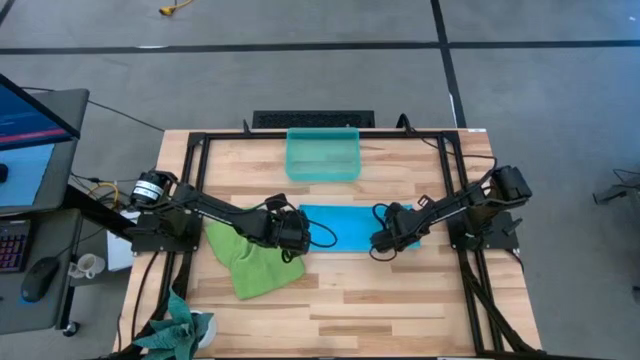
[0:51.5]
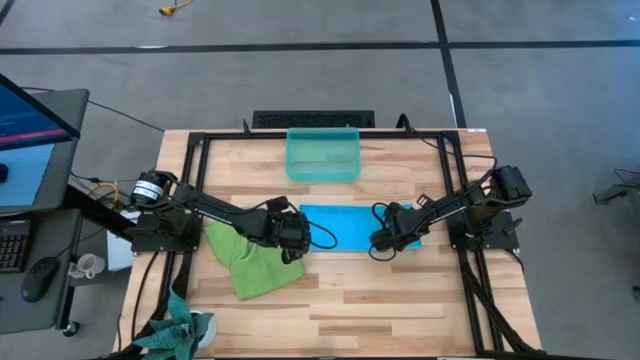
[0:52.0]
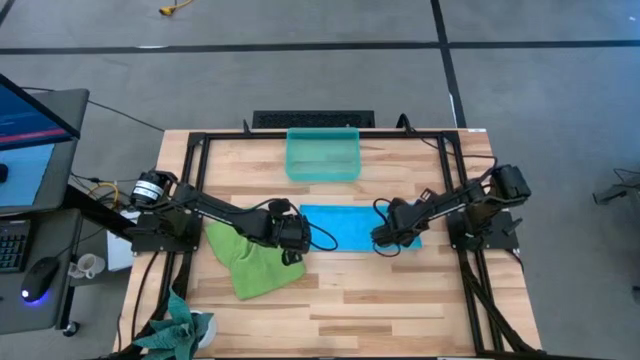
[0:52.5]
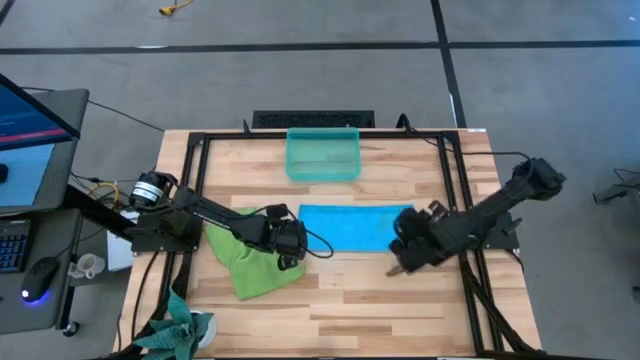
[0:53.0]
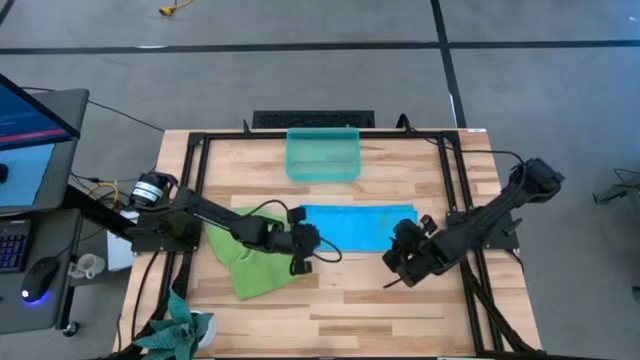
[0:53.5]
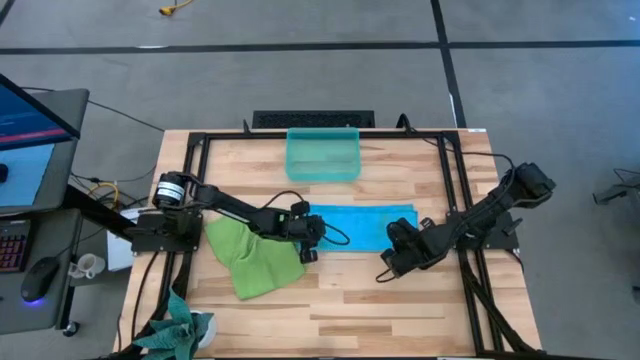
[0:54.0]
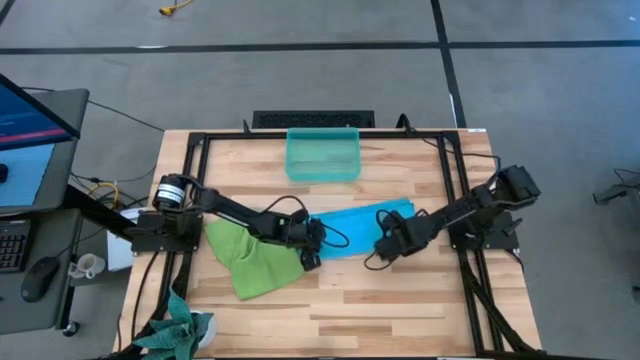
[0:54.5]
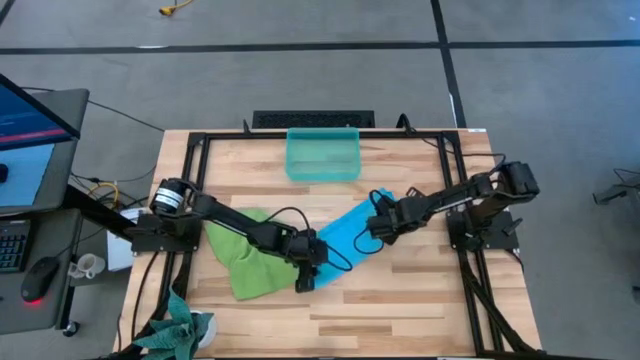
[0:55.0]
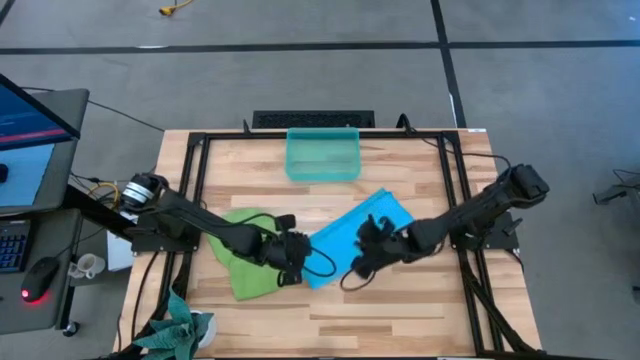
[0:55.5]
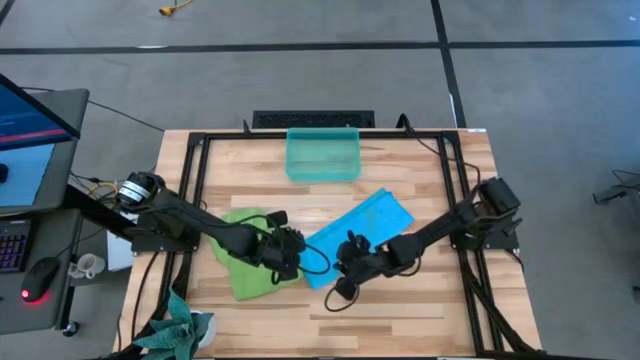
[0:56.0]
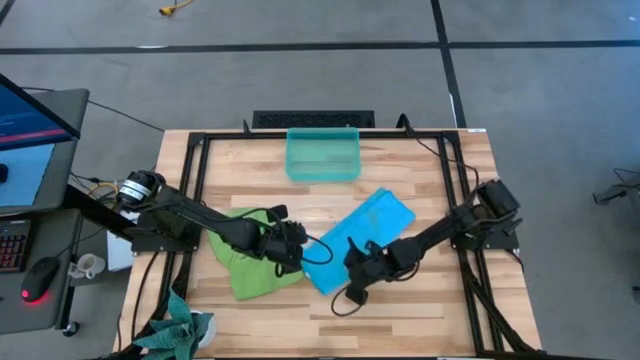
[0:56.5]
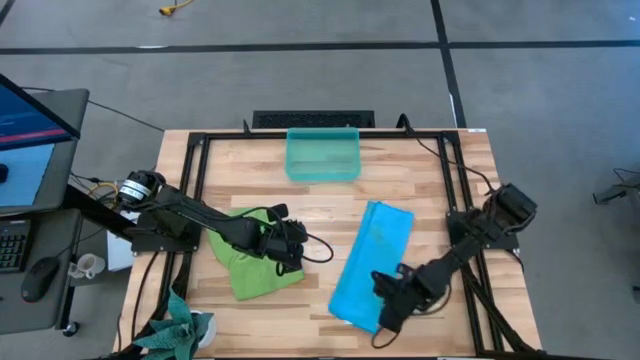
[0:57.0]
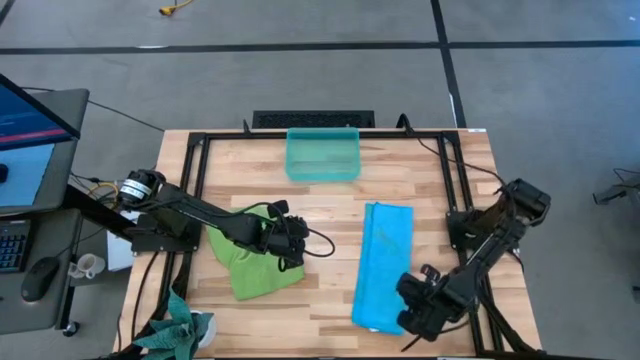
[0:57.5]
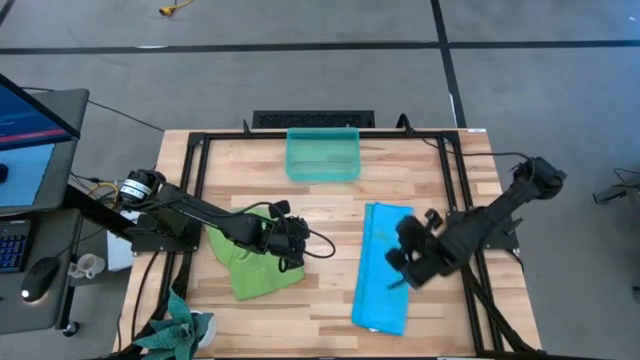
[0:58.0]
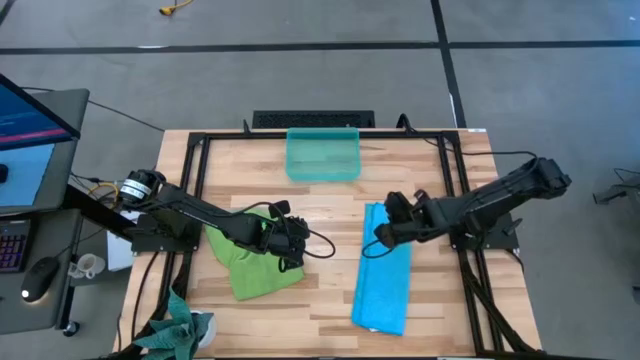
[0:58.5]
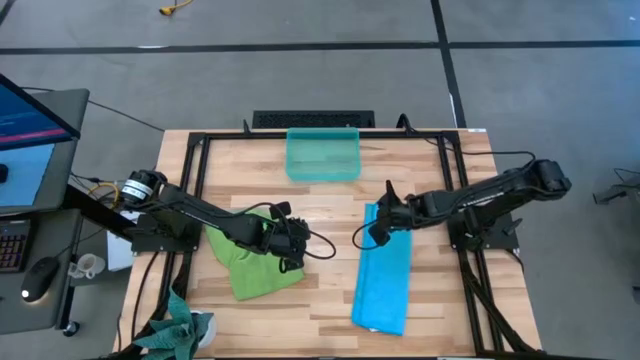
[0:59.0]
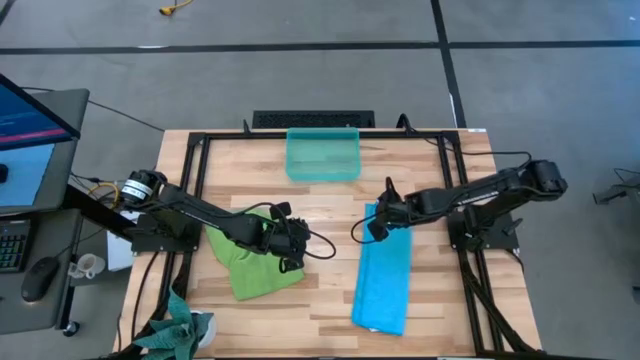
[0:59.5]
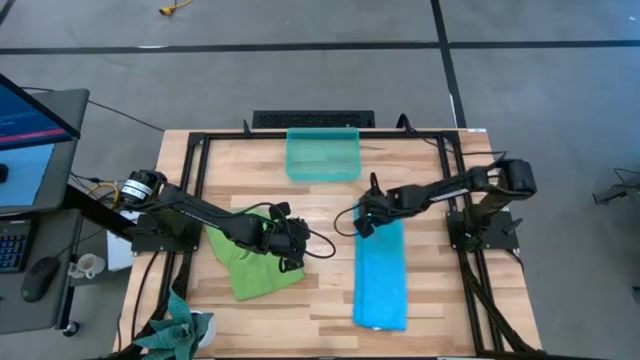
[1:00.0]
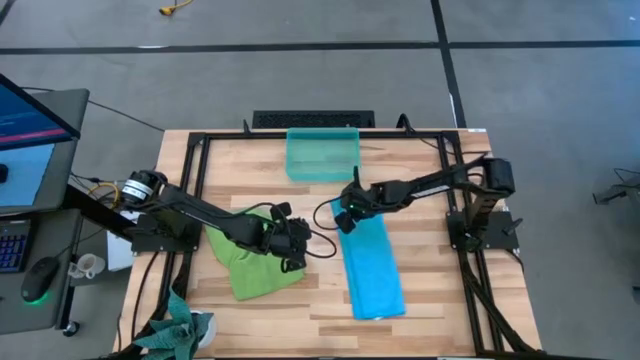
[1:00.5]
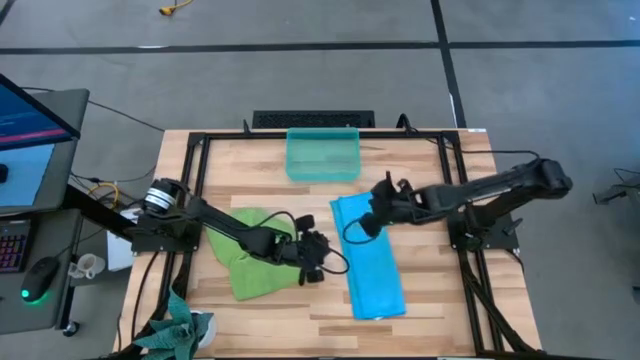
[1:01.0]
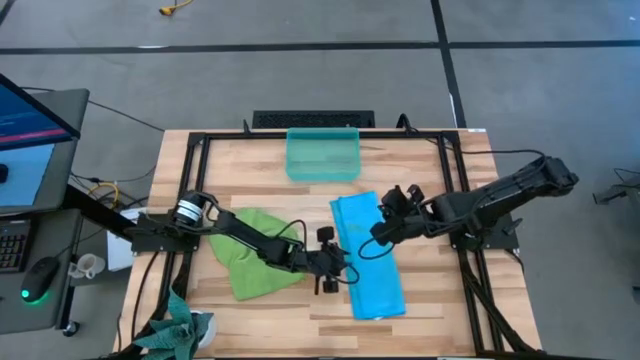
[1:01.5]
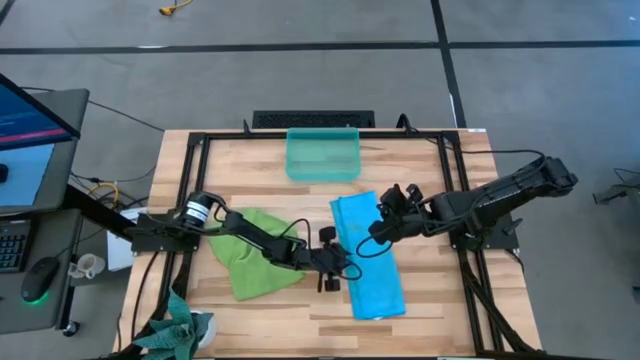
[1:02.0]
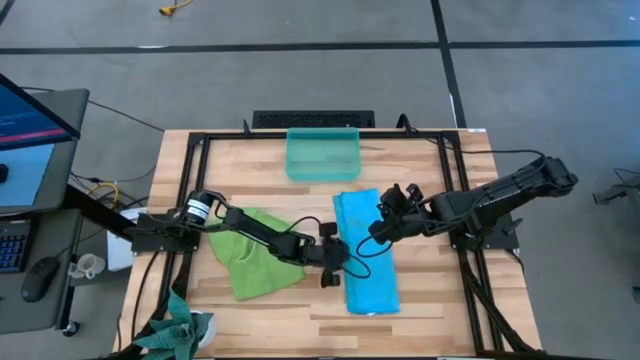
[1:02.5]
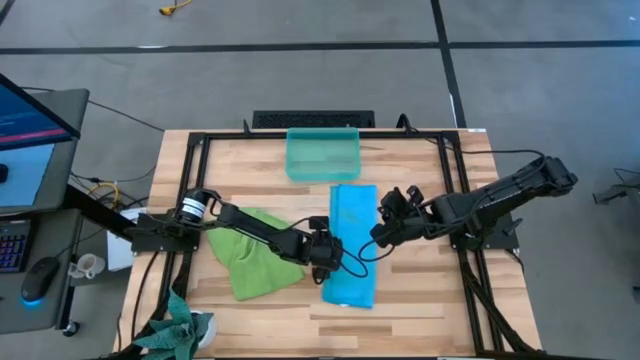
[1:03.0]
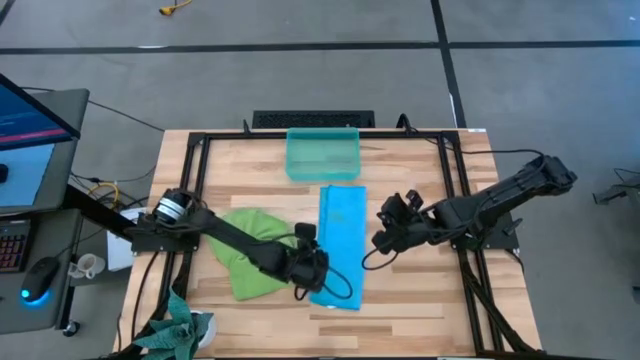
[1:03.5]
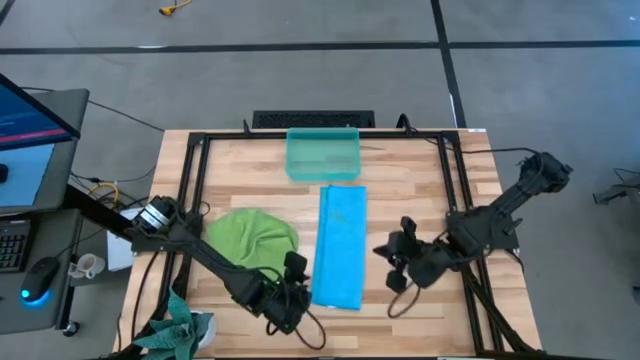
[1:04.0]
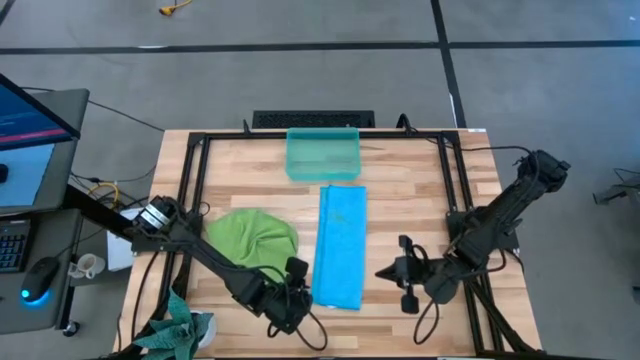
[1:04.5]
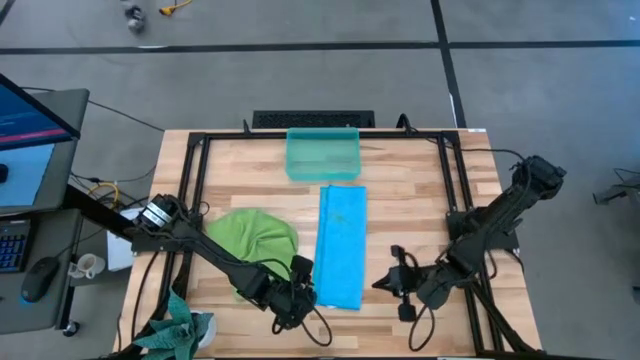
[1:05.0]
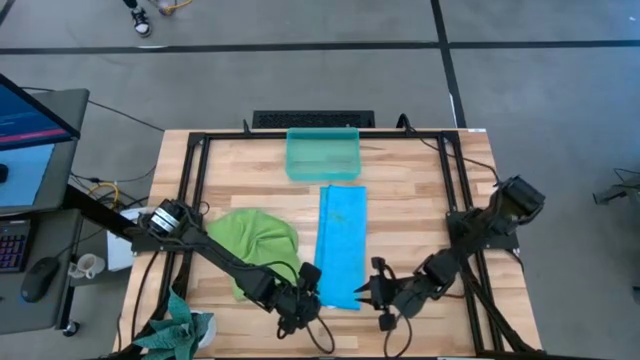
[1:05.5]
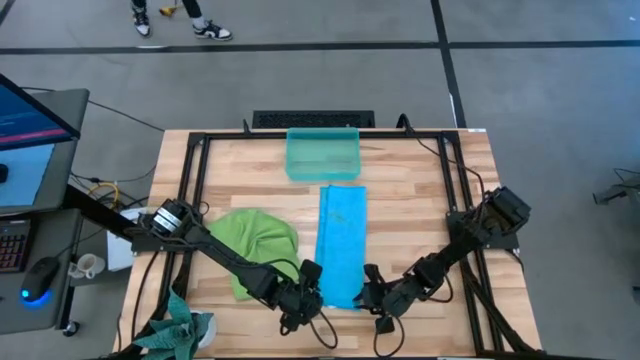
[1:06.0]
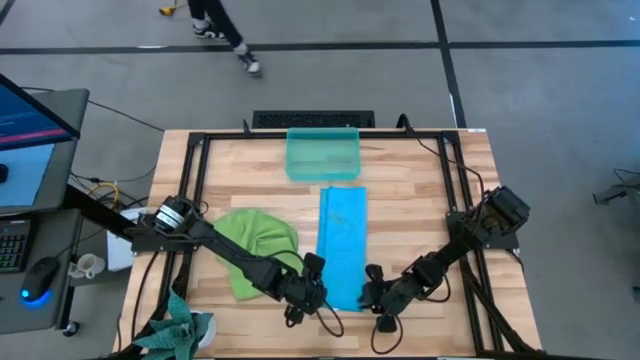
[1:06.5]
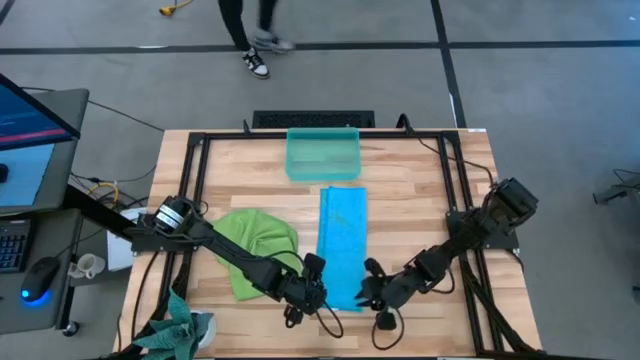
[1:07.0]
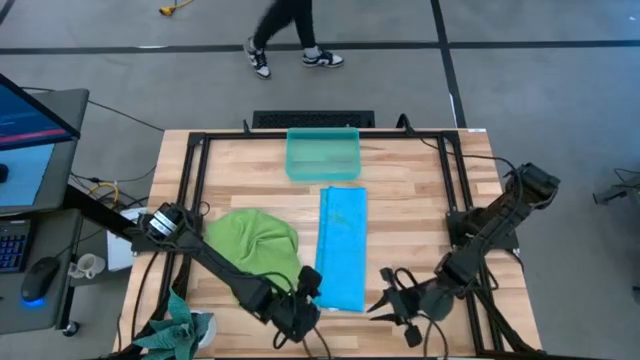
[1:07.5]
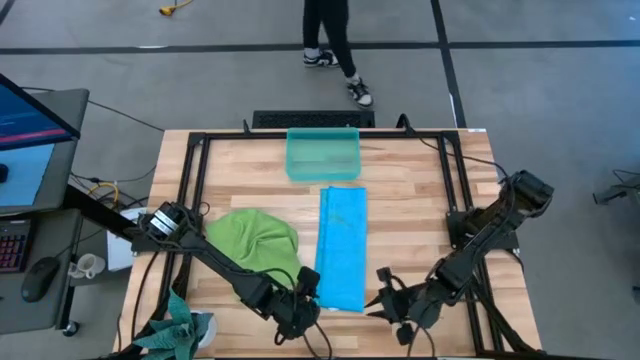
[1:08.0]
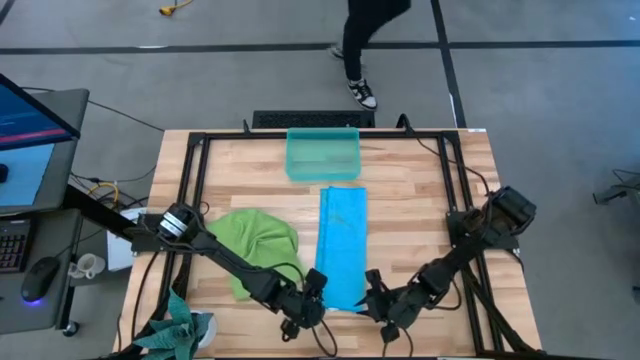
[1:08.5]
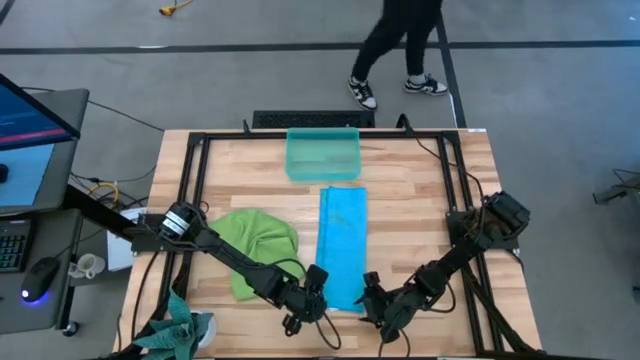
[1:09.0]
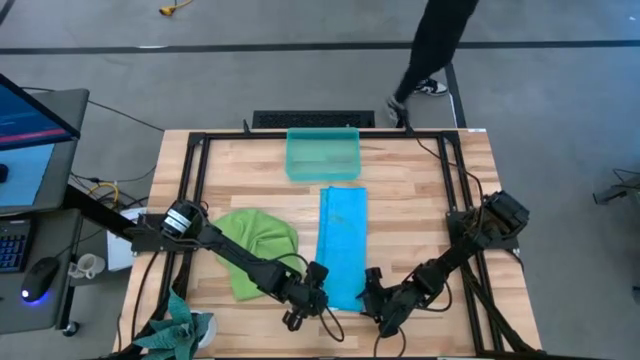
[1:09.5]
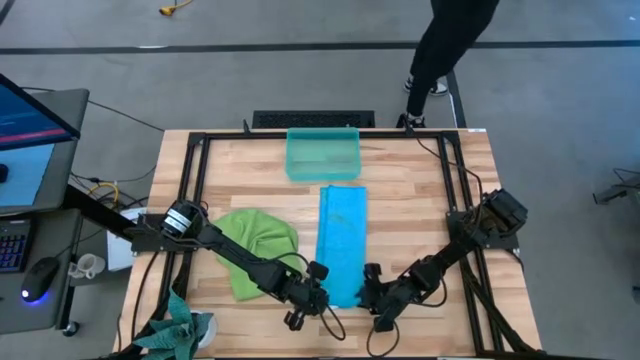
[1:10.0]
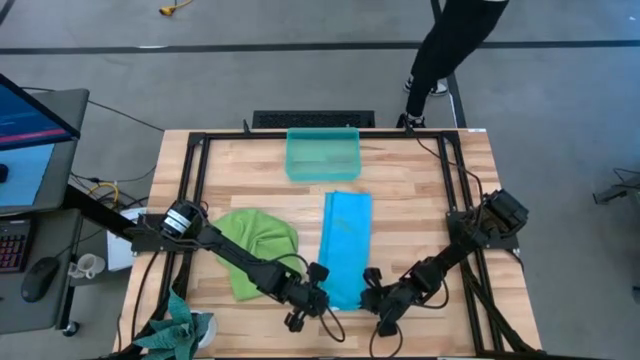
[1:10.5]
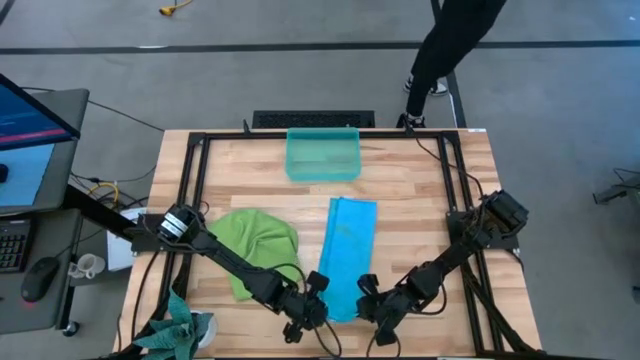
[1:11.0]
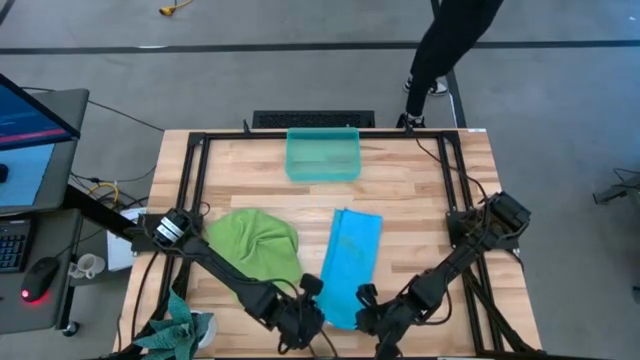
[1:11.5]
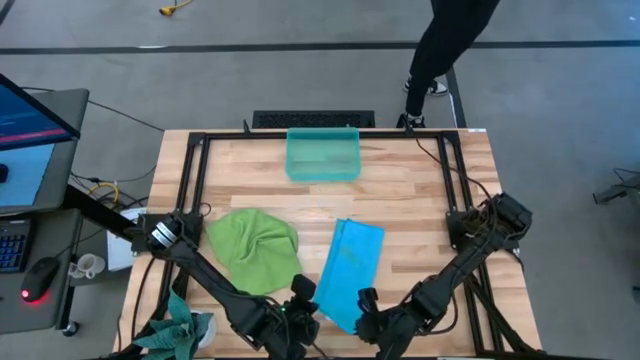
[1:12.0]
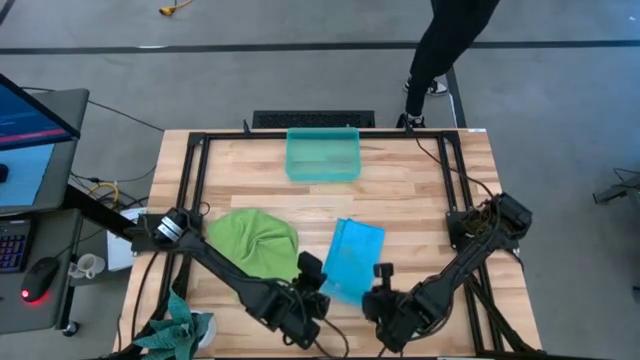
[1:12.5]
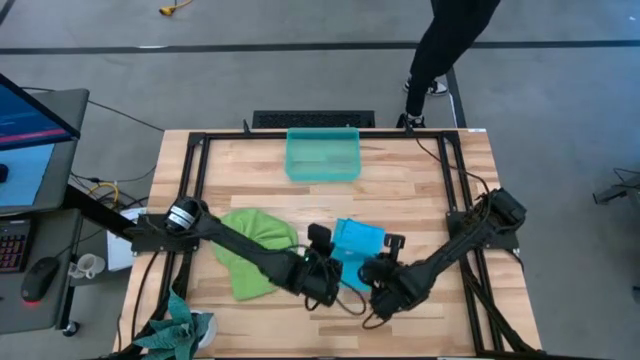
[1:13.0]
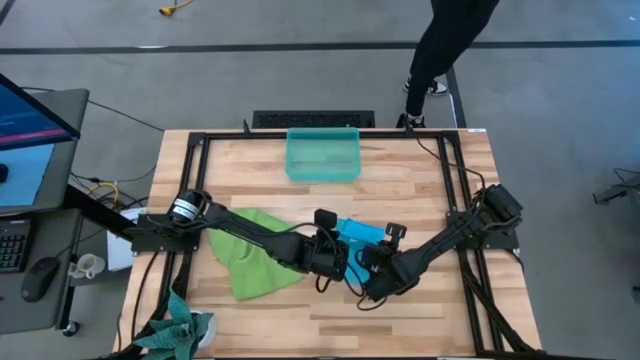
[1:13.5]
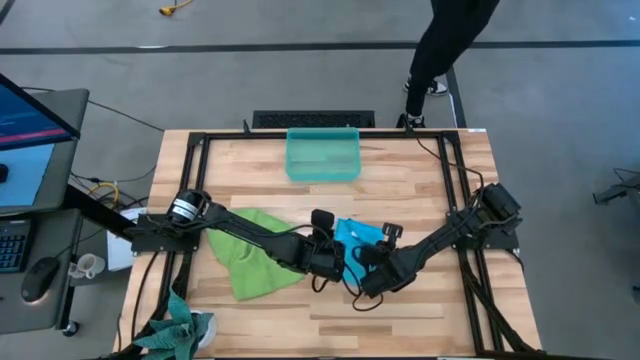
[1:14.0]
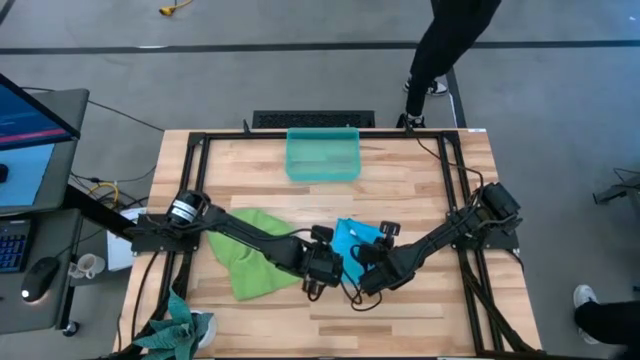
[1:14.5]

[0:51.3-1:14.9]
Task: Roll microfiber towels into tight, uniform cylinder then place into a basket
Fold the blue microfiber cloth
